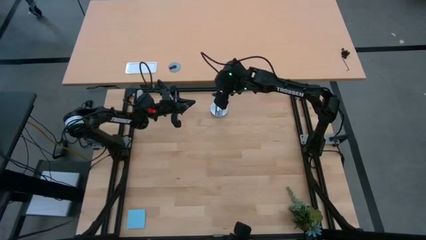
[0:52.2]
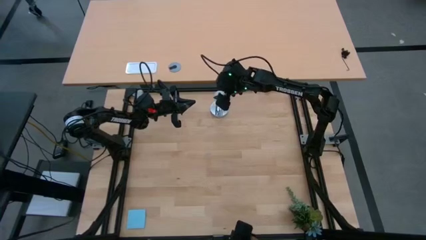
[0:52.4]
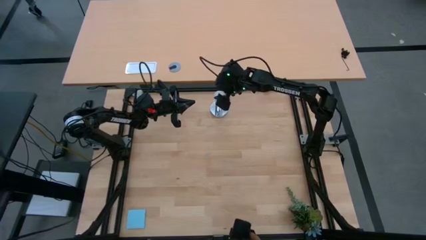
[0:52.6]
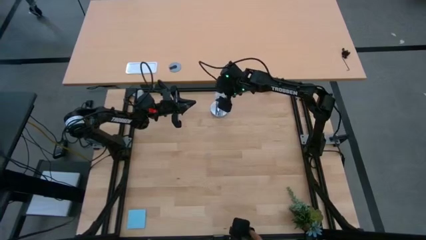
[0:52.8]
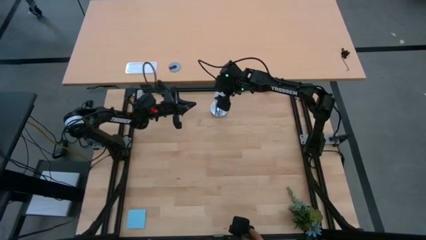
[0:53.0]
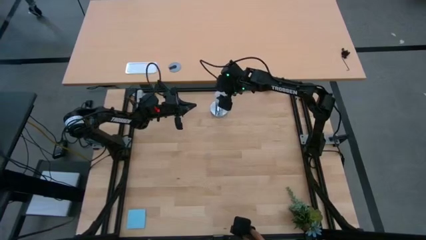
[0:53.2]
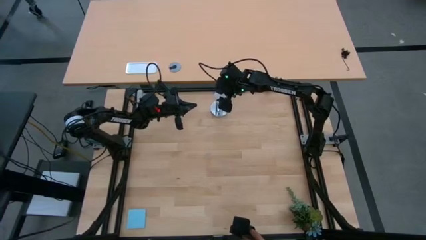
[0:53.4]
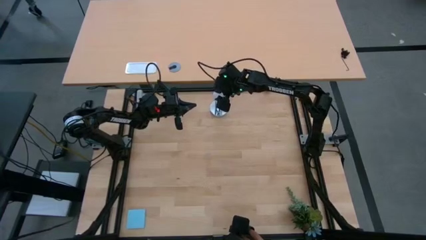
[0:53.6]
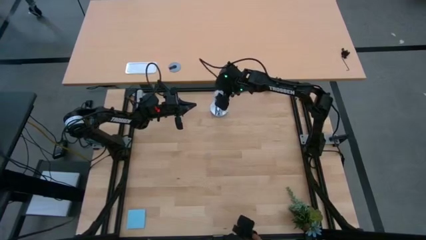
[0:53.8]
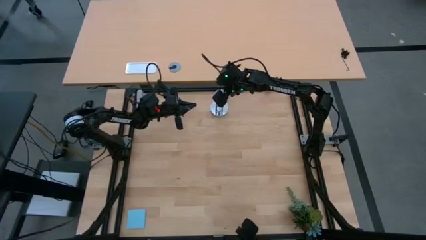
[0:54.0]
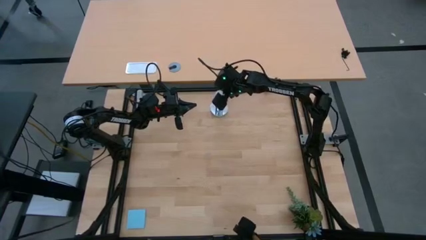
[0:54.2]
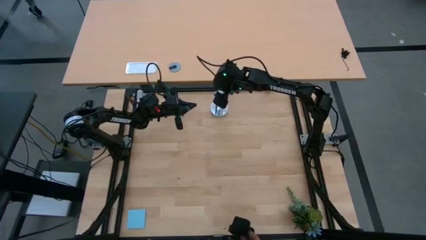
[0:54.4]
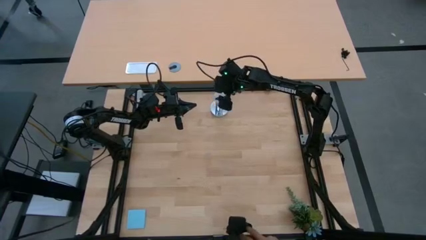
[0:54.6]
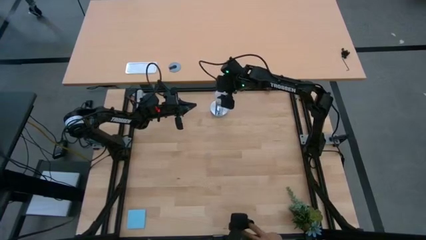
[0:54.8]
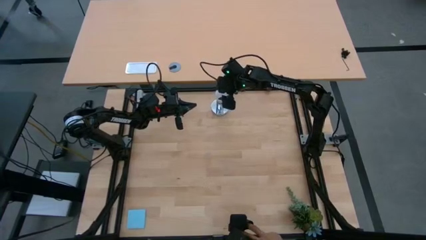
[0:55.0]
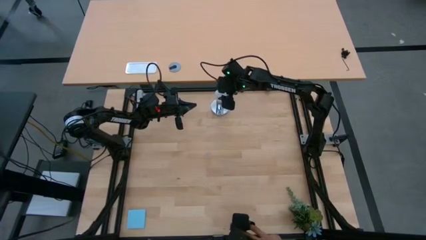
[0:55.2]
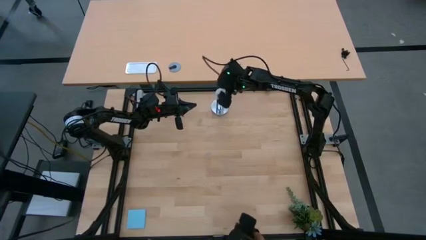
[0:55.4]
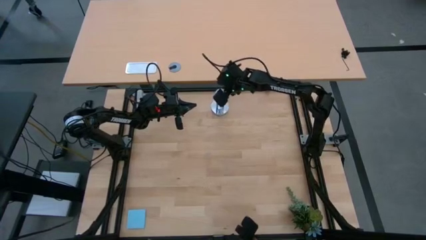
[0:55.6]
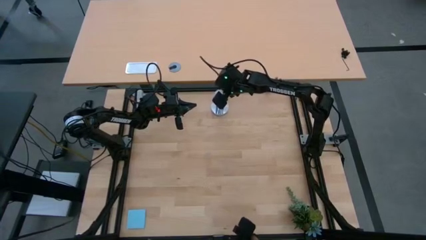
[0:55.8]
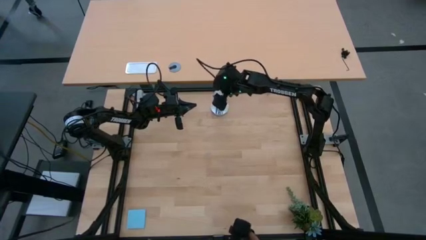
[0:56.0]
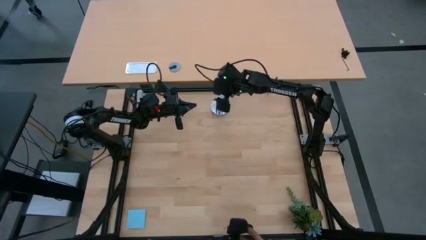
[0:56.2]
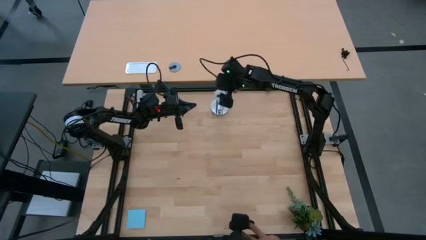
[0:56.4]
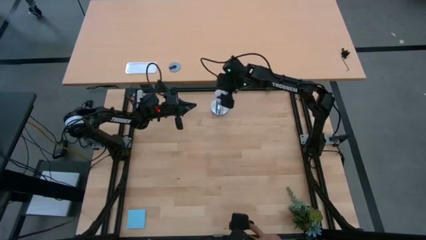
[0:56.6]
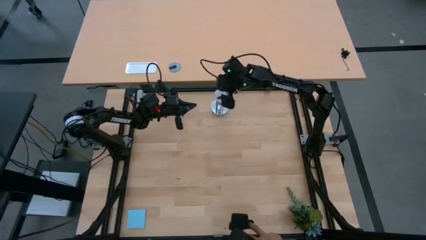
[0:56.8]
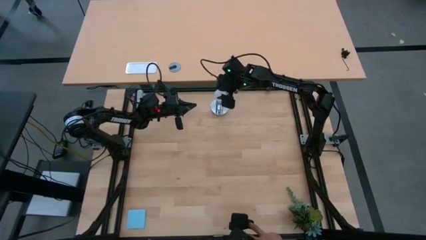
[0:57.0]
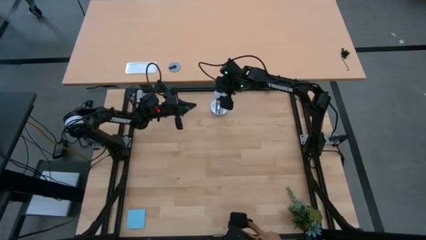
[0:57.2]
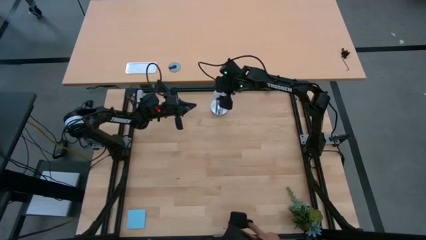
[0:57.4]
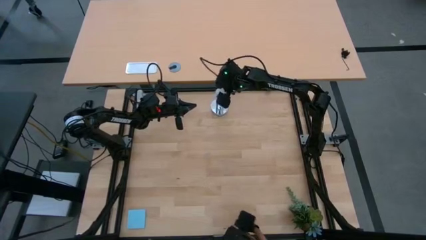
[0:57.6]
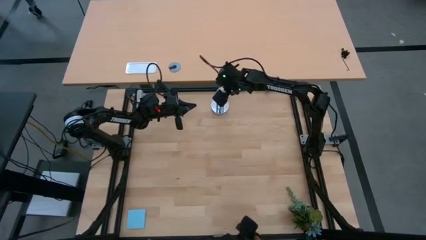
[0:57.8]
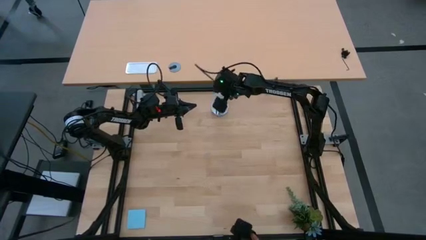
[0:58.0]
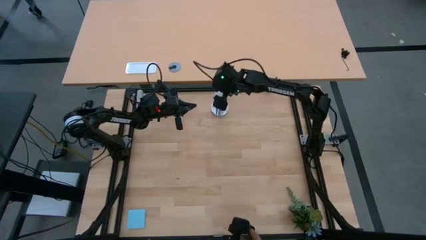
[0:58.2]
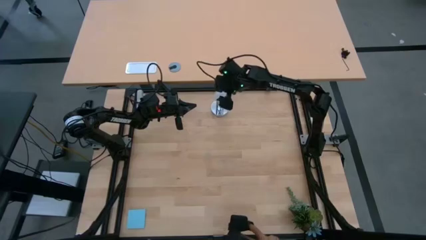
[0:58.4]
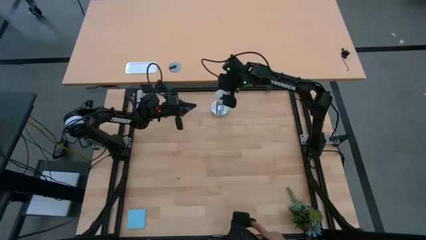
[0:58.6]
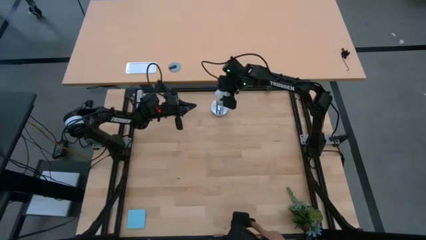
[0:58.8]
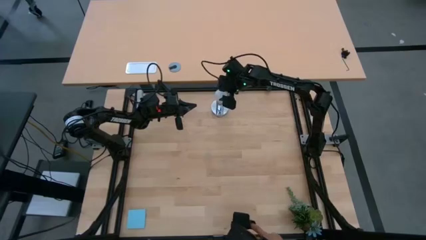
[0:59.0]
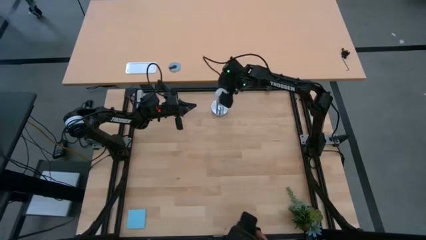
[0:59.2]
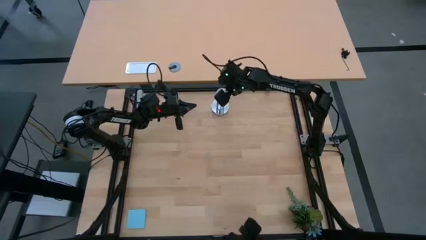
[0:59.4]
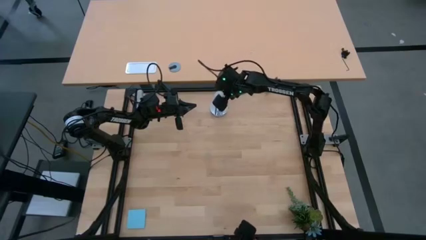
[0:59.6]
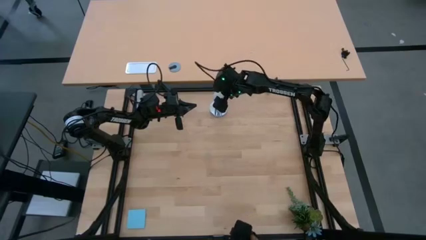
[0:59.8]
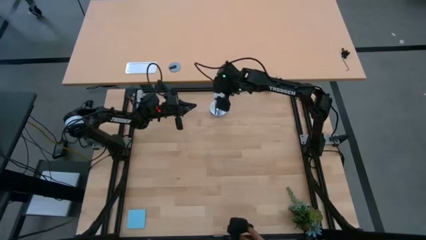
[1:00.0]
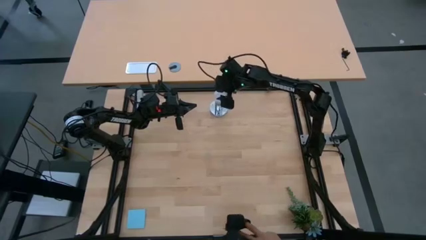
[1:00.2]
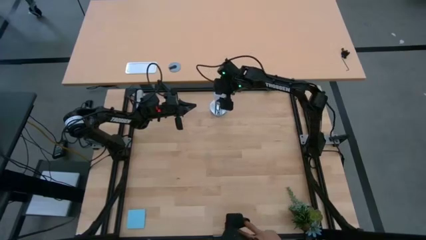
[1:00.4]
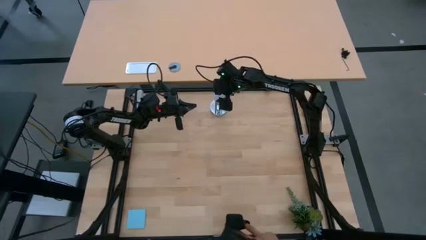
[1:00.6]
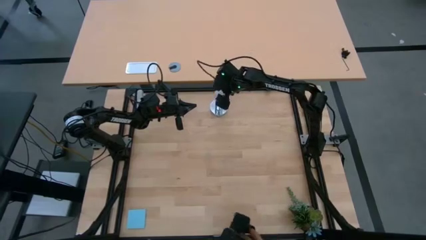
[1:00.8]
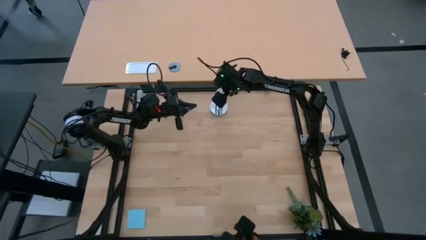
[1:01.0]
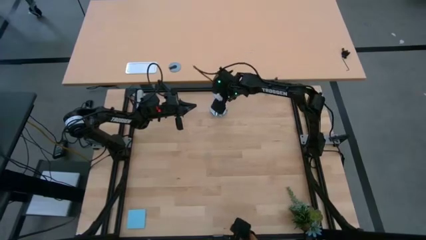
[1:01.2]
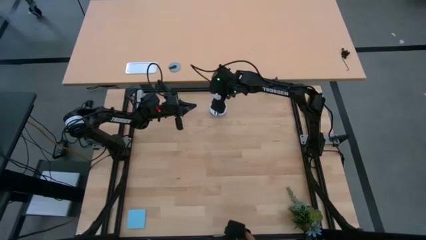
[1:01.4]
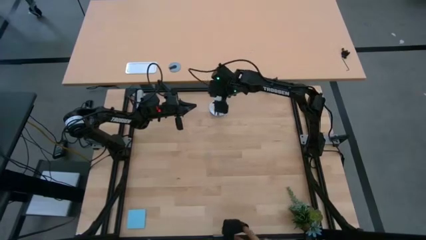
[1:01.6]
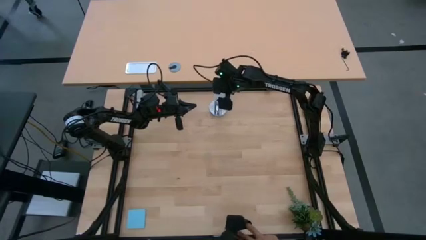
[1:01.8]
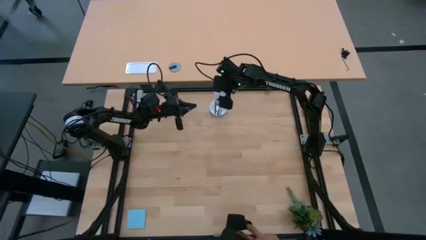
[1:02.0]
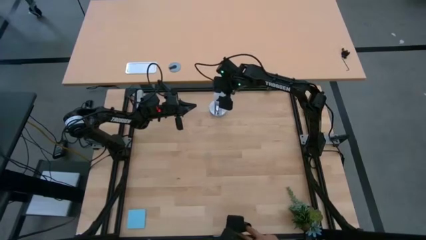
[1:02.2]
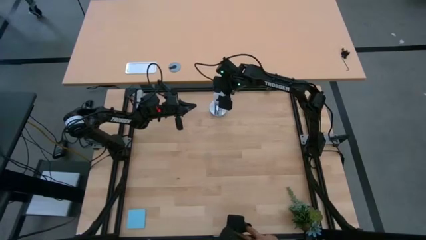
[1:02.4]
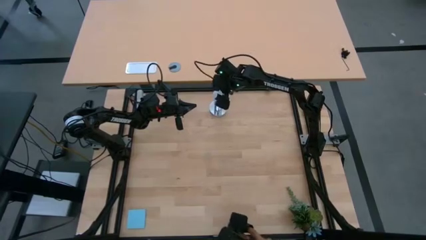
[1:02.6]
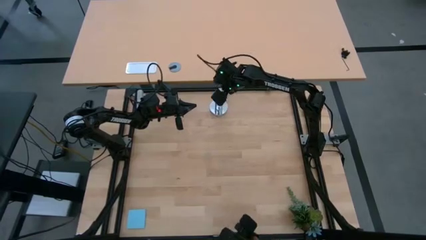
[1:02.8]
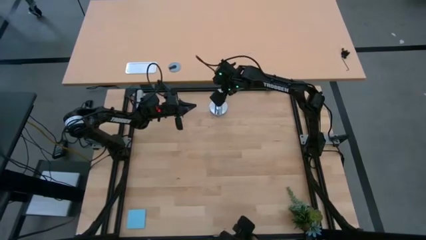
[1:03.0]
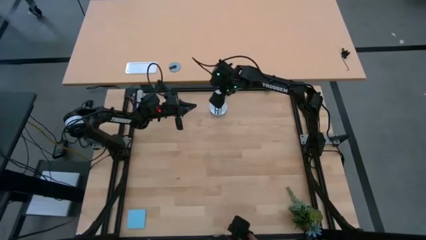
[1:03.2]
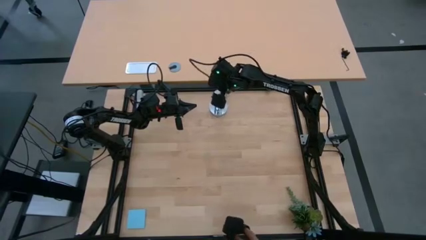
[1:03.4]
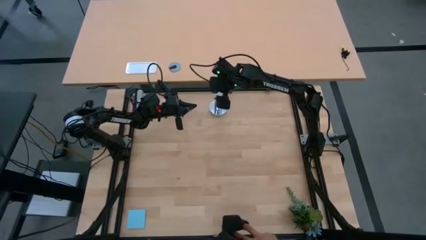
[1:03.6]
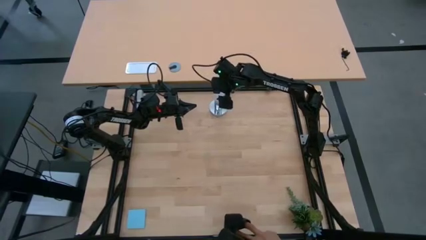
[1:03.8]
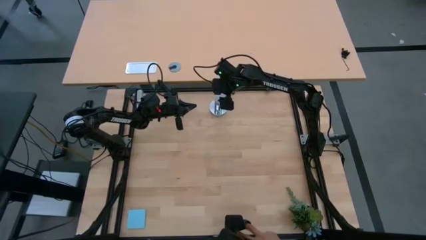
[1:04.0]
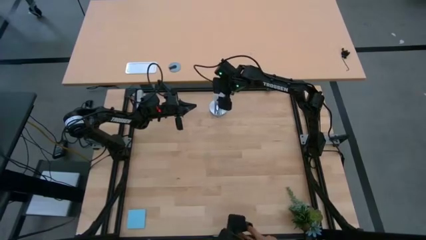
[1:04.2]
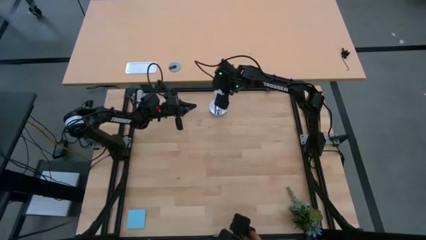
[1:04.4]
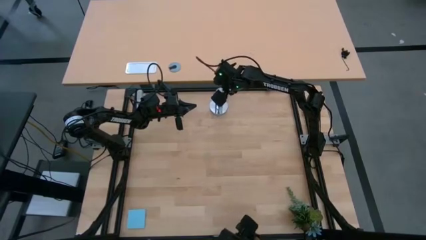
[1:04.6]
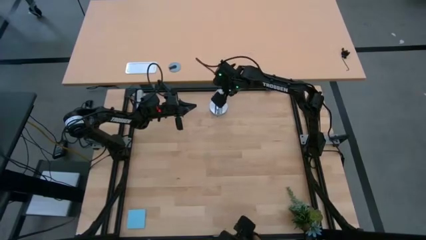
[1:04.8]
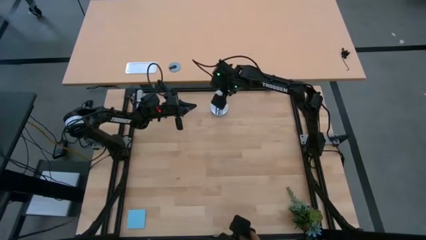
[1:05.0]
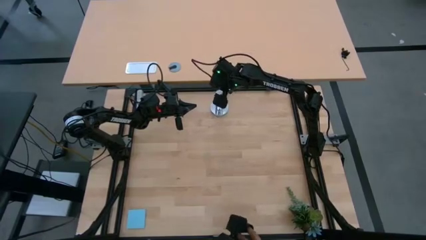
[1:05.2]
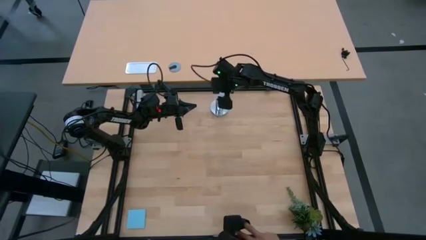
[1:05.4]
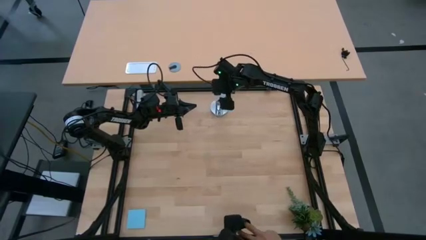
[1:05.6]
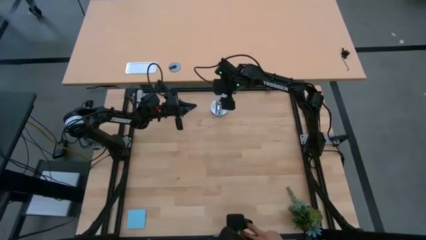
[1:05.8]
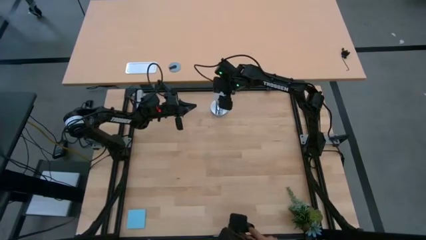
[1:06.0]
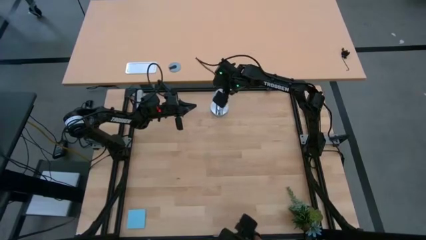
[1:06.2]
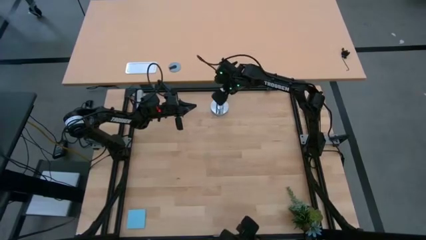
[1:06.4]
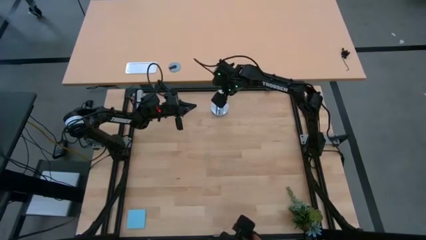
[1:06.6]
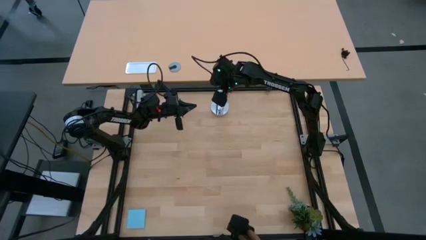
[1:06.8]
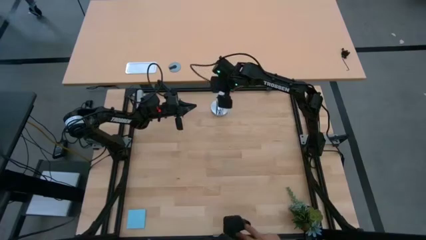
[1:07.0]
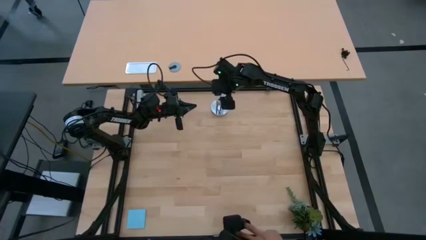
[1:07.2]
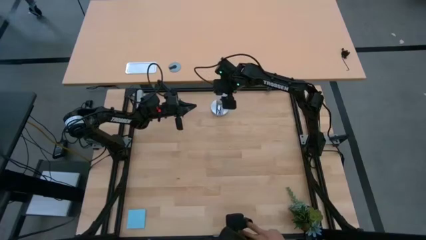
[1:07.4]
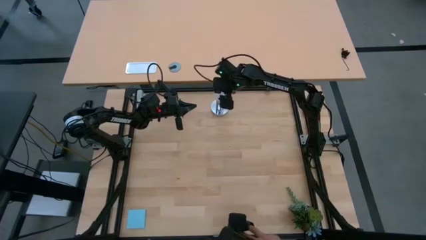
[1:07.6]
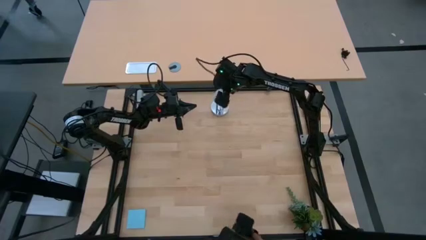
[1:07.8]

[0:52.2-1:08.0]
Task: Screw lightbulb
Insert the white lightbulb into the silver lamp

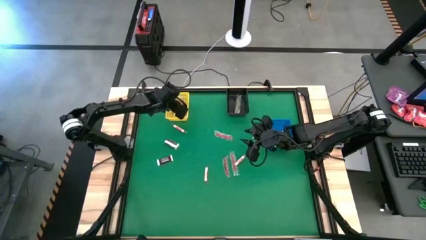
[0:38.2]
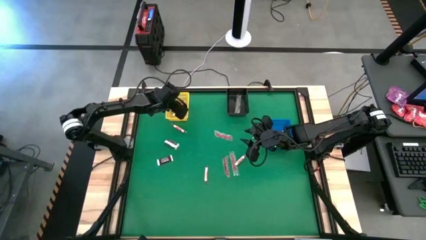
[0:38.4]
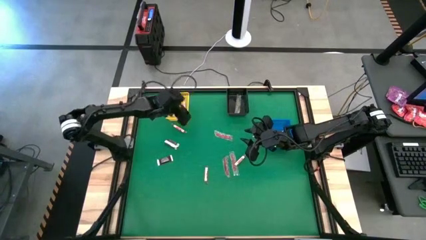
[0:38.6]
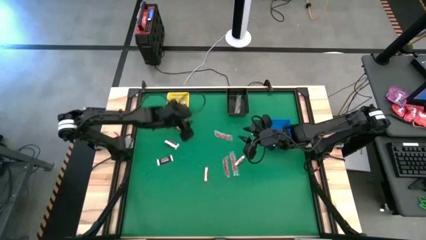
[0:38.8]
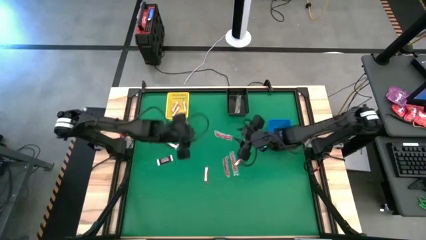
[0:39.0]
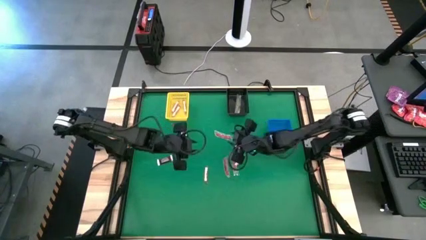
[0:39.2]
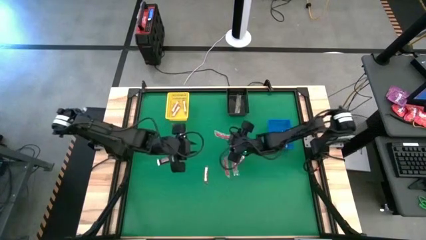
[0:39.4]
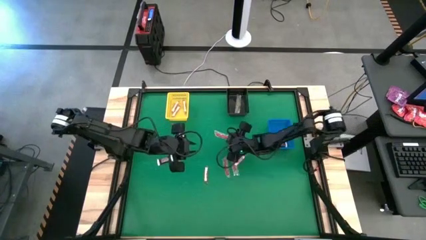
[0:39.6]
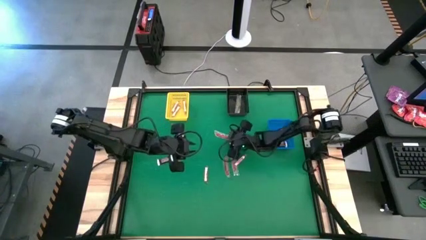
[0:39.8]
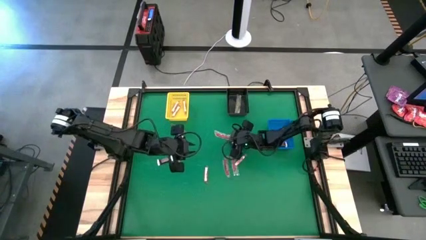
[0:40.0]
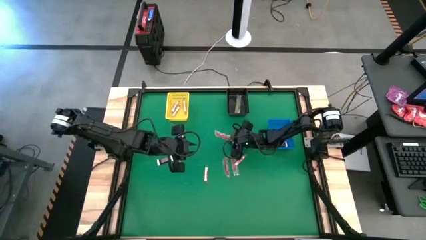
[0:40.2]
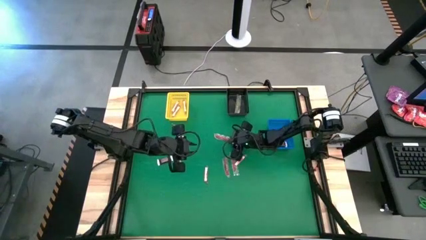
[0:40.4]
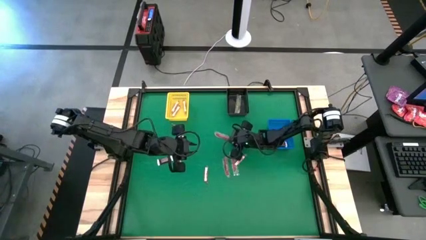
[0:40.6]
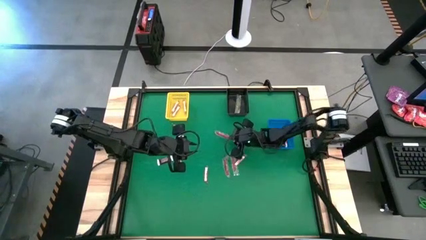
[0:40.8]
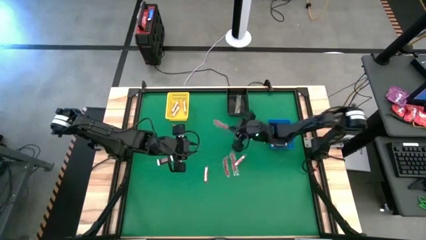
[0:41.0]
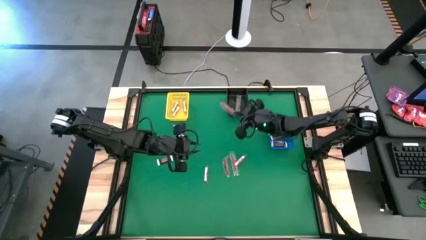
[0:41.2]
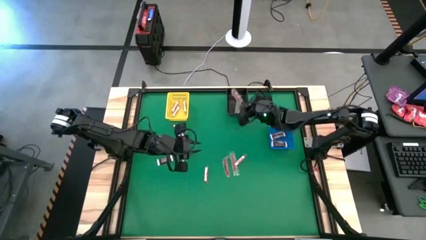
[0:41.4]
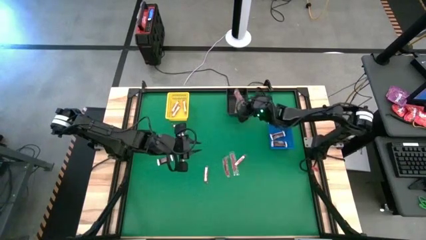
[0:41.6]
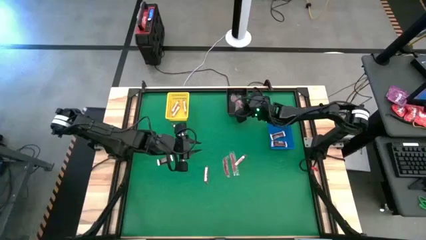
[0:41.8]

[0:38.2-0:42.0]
Task: Sort candy by brand, put in halloween buckets
Put the red candy into the black basket
